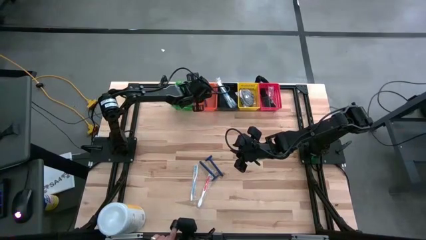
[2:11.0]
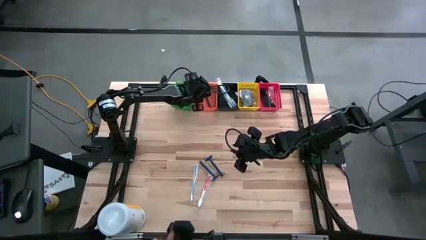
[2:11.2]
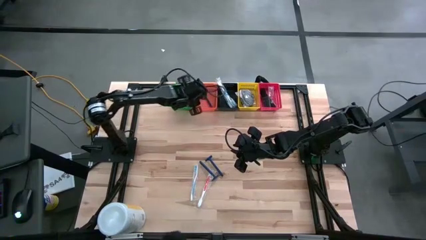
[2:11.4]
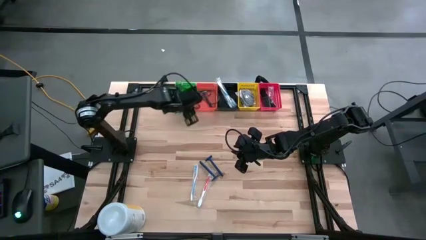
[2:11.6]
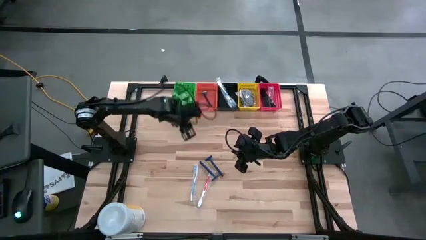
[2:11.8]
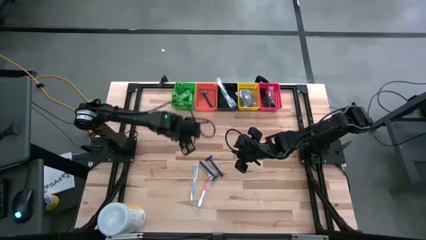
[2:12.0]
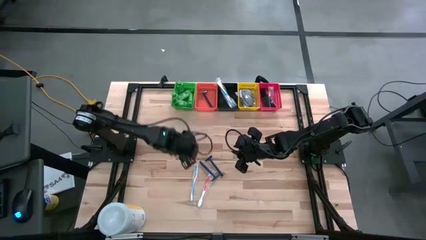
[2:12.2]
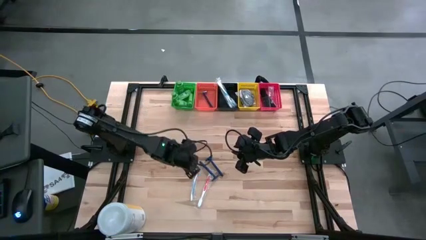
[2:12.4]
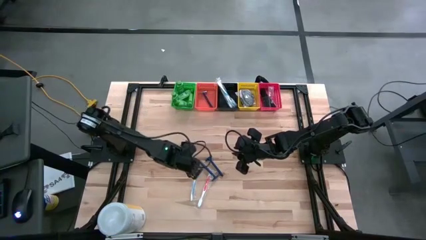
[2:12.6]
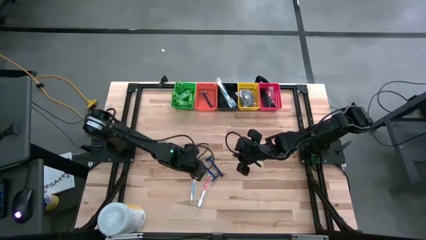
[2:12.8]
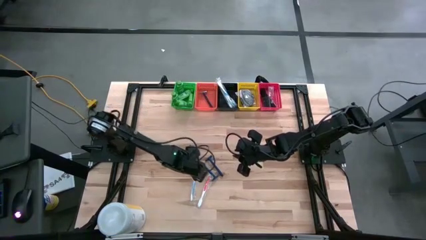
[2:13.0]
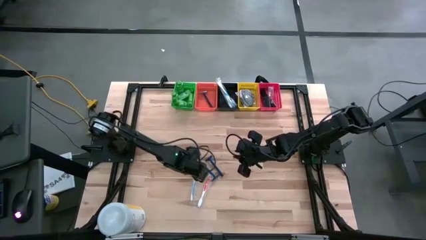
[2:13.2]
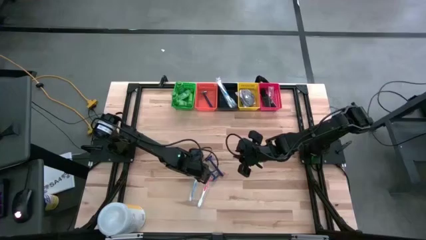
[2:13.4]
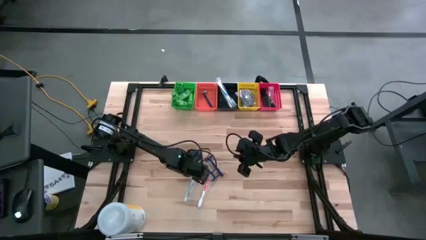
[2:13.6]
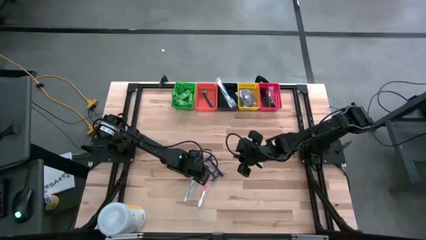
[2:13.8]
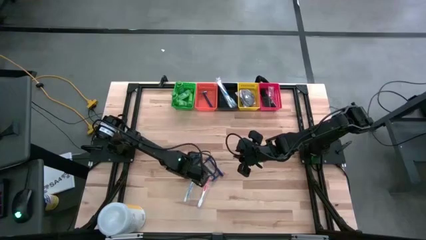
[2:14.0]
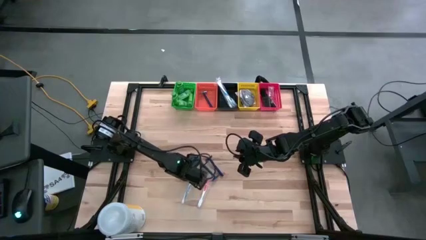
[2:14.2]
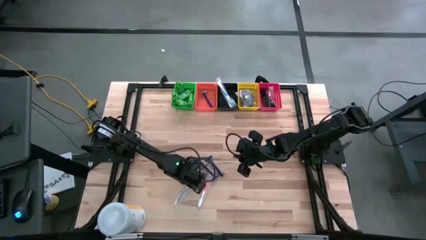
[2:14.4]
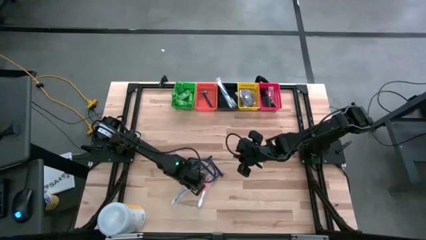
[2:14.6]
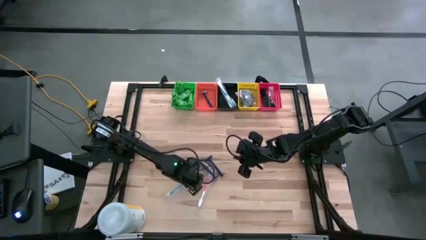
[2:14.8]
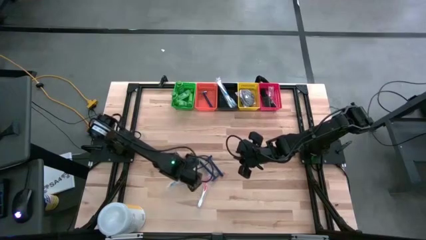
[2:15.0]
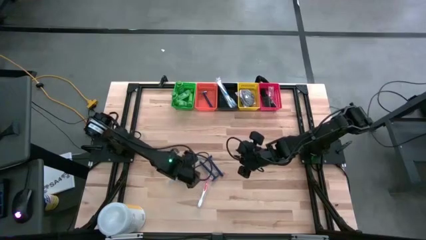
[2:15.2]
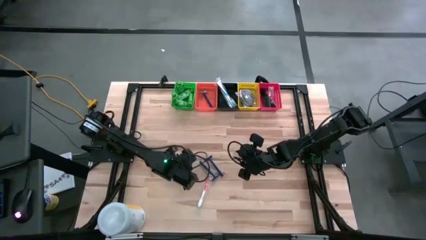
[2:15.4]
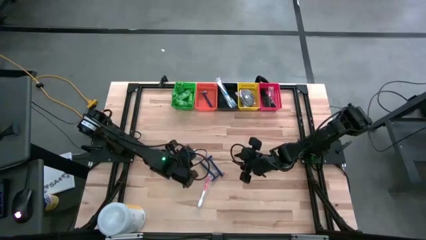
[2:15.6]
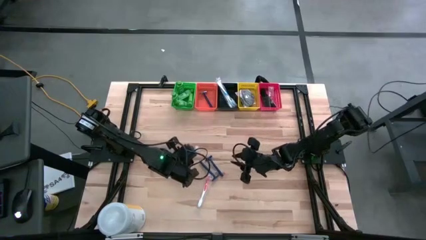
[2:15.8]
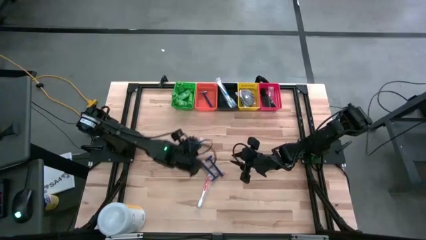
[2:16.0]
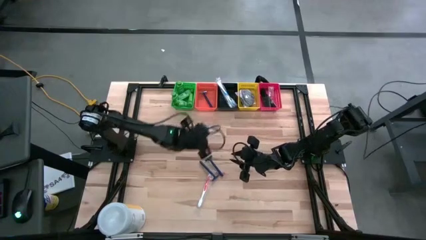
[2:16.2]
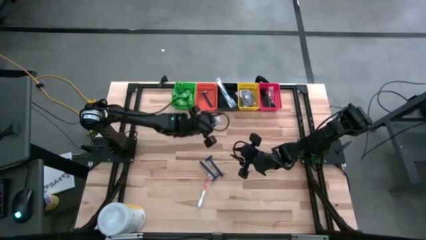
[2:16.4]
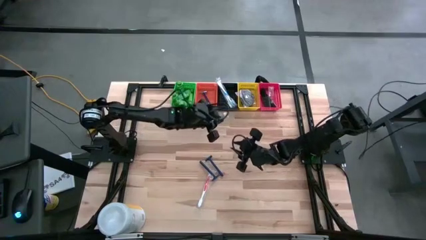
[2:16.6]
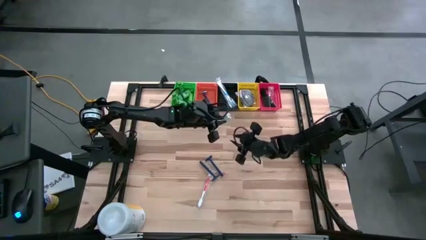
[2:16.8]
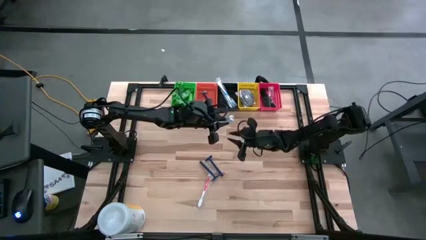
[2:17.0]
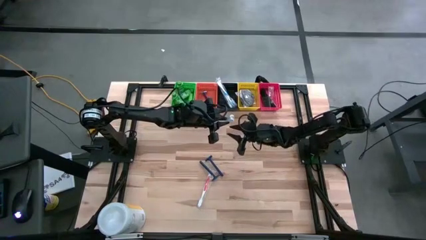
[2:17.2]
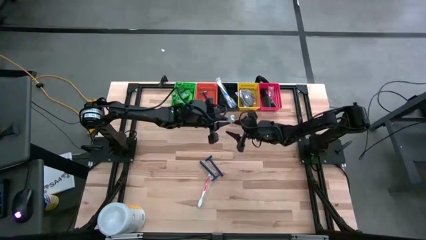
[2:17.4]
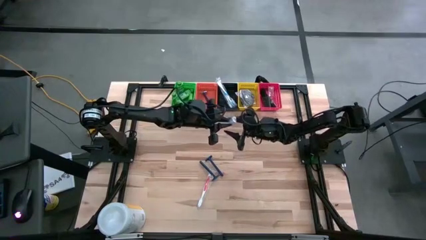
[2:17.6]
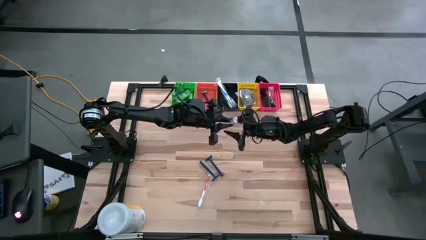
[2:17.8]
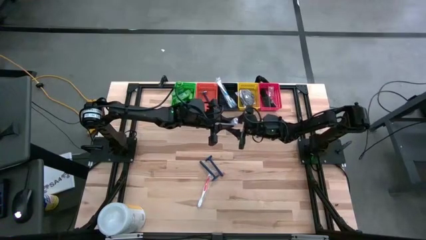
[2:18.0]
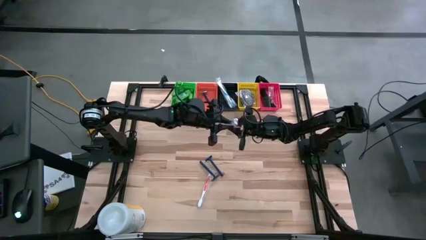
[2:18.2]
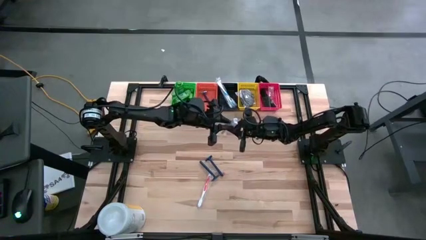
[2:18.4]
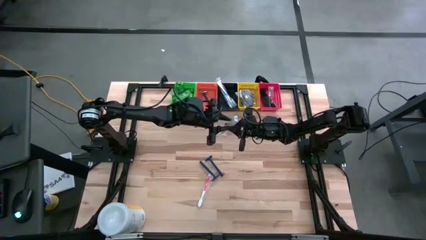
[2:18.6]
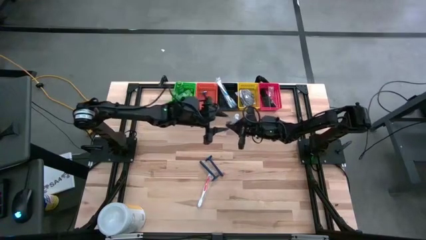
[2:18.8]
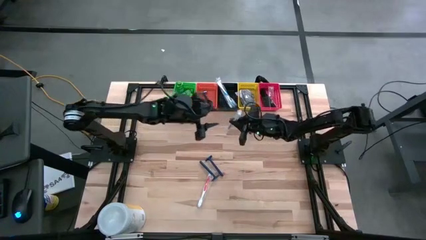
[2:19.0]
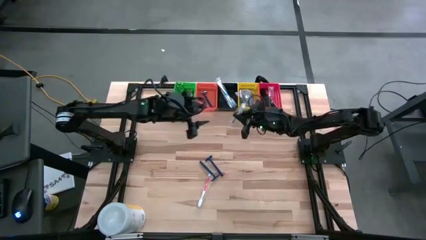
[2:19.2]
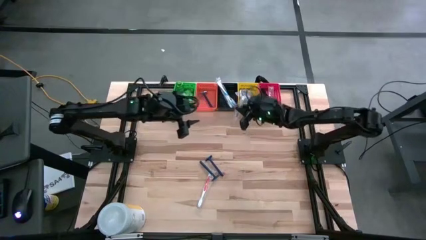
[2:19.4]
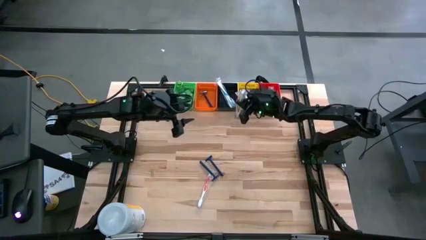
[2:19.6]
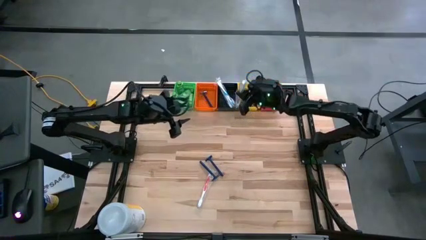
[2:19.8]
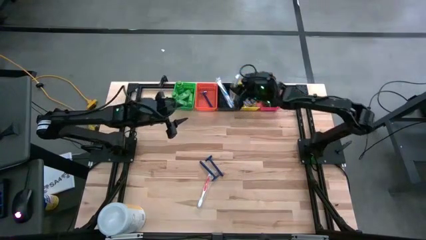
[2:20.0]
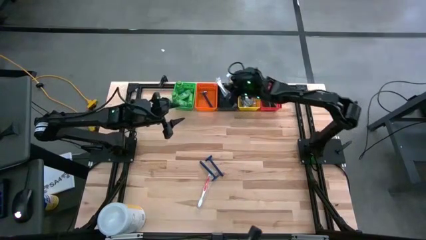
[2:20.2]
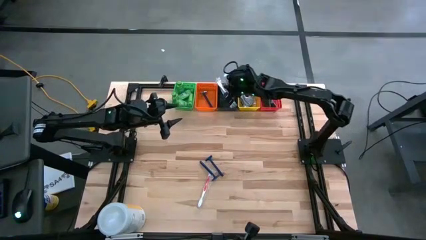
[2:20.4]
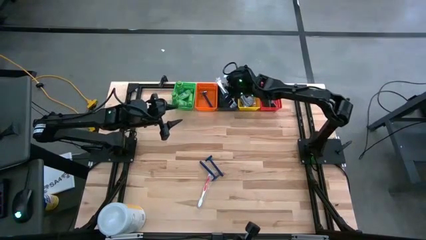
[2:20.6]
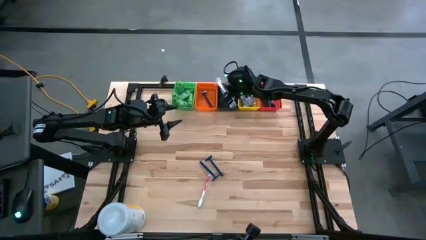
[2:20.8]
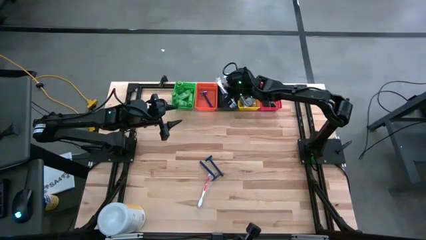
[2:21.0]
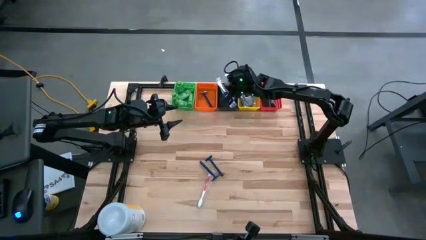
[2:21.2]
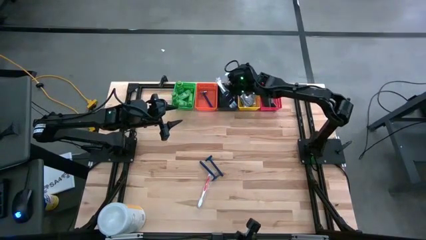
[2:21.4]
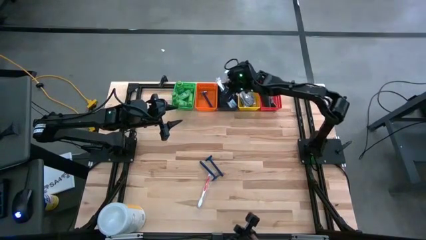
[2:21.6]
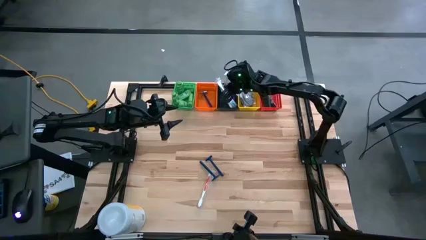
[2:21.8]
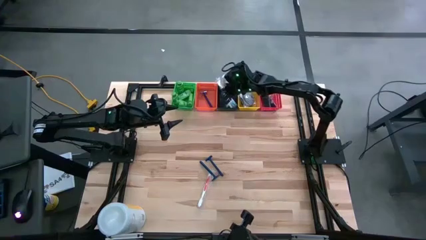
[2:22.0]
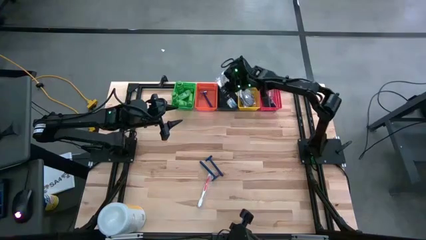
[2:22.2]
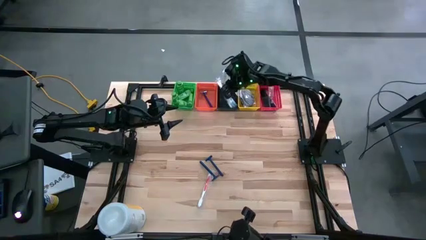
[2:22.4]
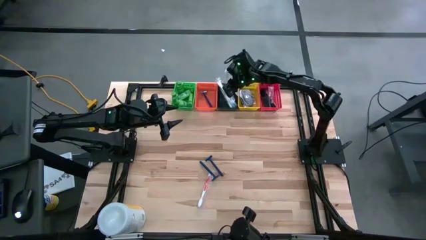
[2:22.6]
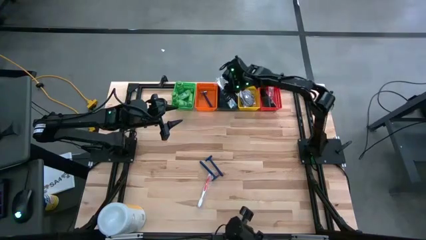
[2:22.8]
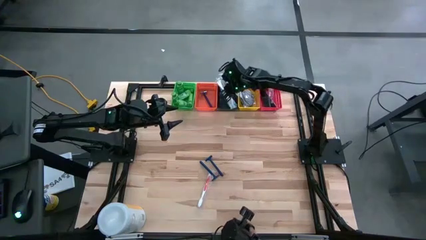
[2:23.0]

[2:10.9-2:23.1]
Task: Pick & Place Travel size toiletries
Put the light blue toothbrush into the black bin

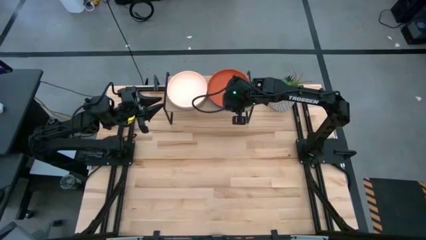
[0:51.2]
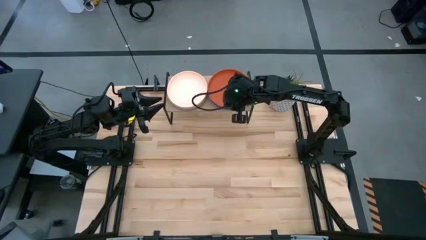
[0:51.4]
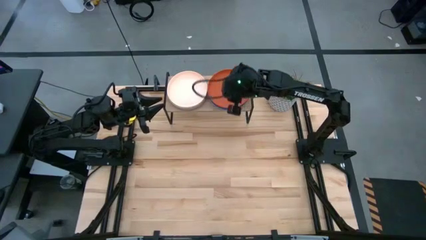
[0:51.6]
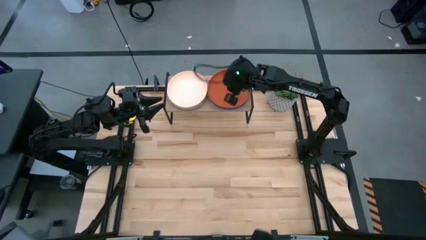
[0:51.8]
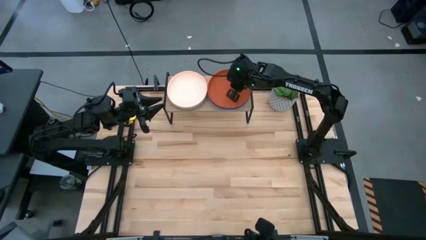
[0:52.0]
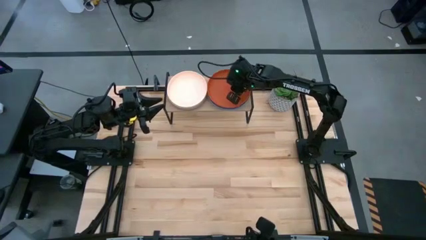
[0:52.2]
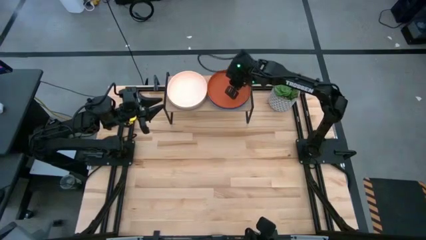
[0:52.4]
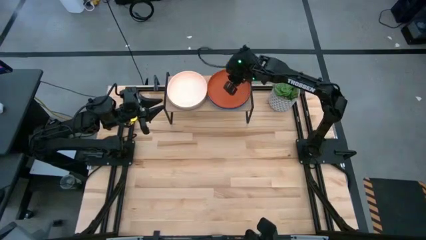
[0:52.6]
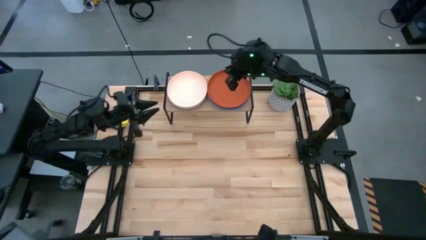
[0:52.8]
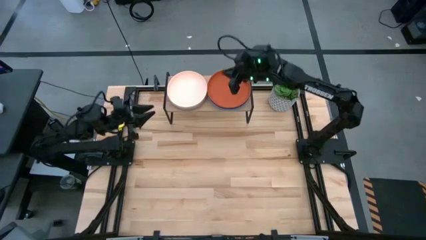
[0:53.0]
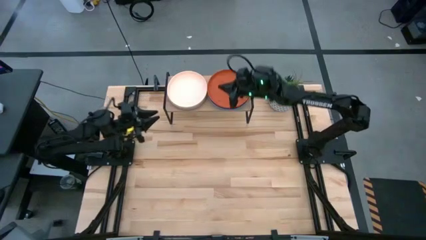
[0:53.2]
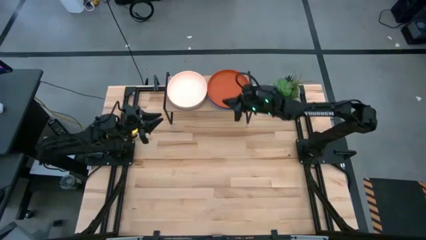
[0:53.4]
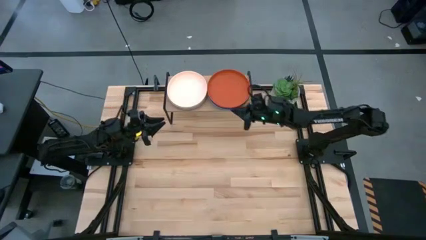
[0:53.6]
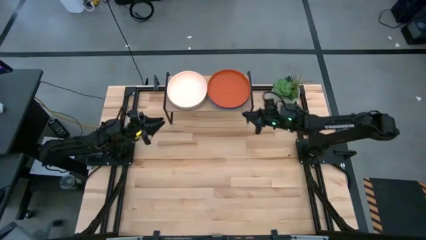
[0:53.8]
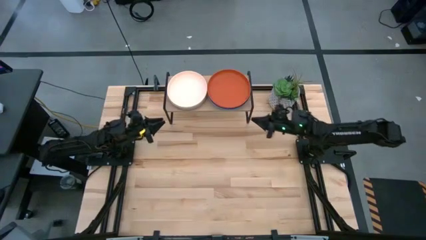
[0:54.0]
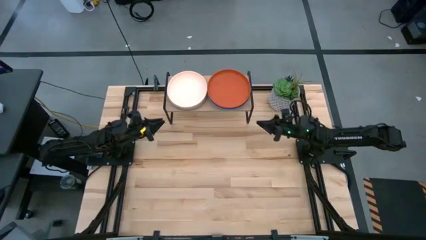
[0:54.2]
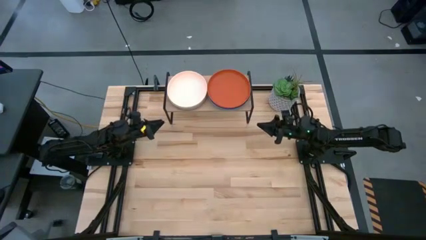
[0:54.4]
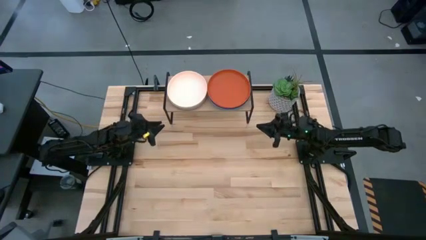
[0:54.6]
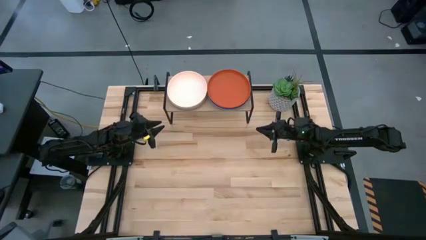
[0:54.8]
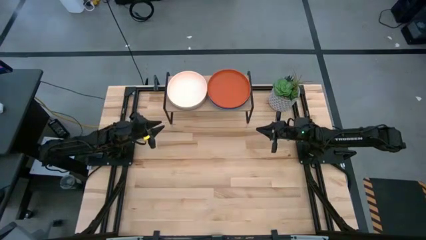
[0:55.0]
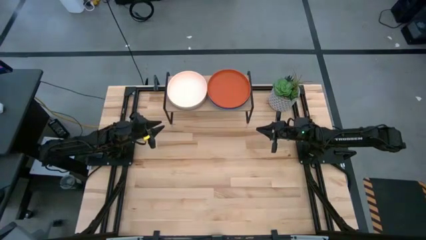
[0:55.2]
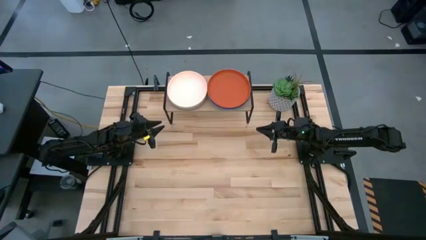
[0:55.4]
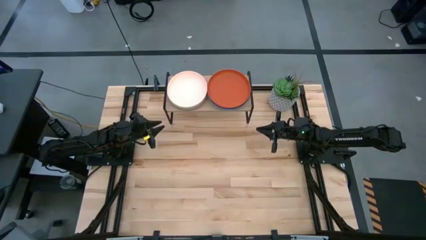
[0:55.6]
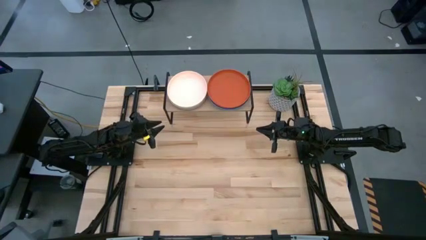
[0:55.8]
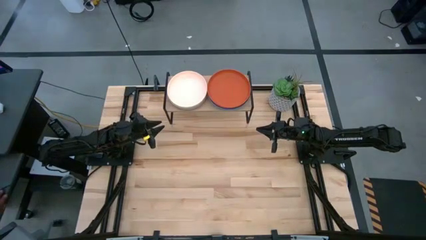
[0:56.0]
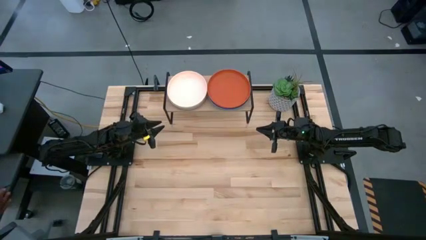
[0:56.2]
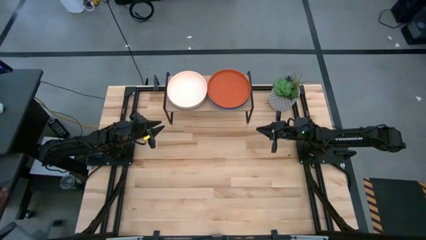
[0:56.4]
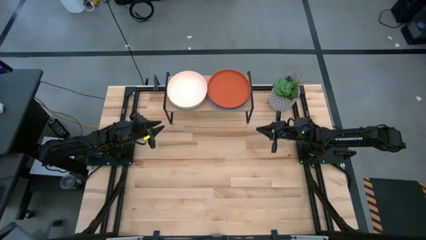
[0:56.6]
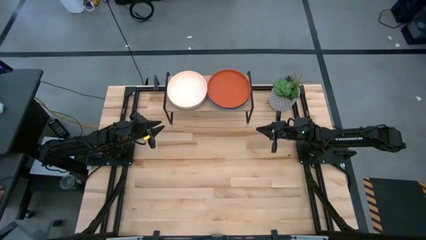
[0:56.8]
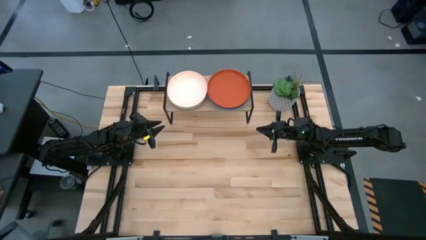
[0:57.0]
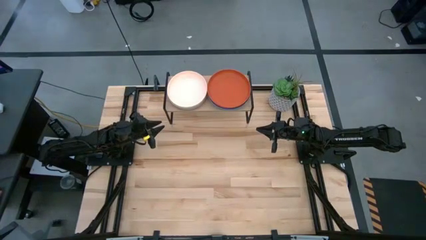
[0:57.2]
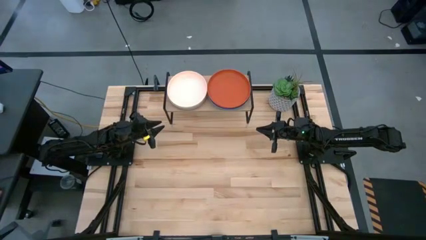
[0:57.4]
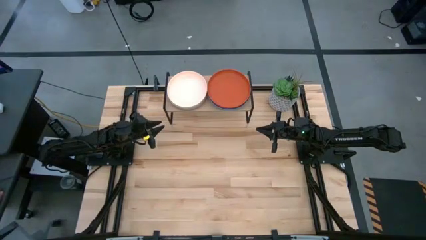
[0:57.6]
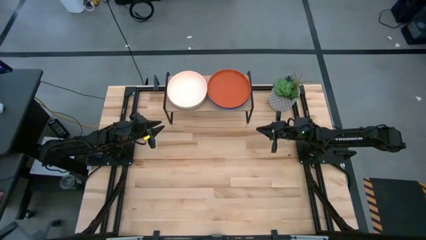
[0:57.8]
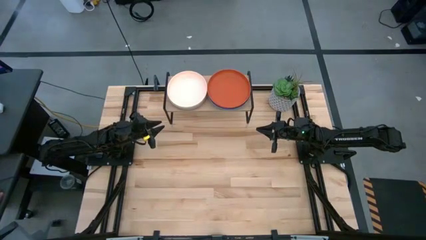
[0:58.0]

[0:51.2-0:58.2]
Task: Place and stack plates onto a shelf
Return to Home Position
